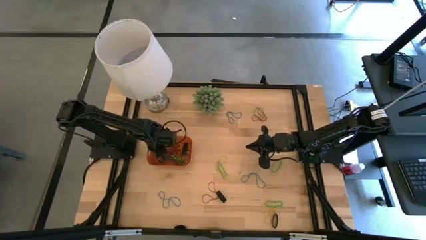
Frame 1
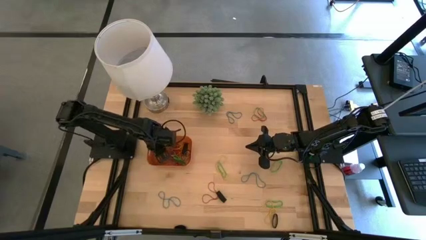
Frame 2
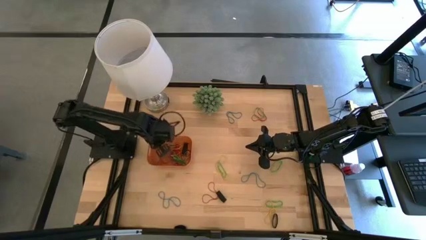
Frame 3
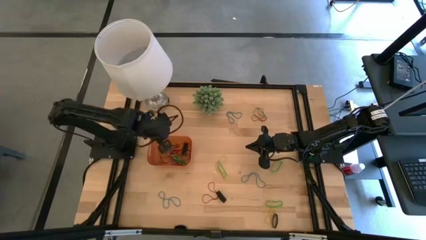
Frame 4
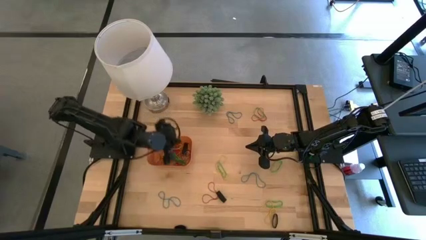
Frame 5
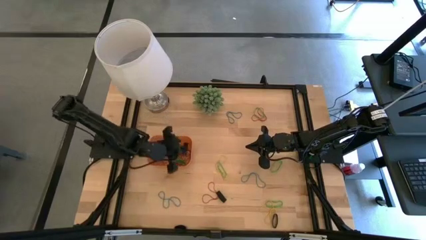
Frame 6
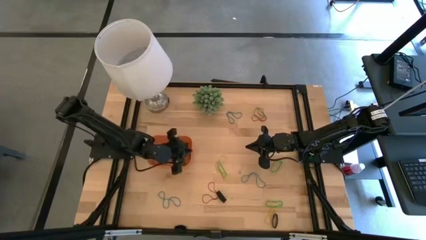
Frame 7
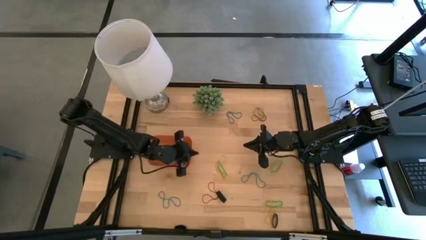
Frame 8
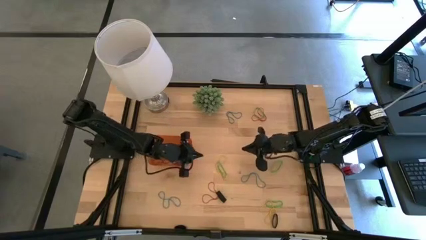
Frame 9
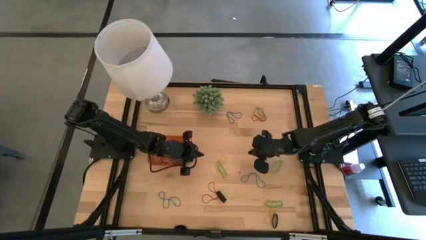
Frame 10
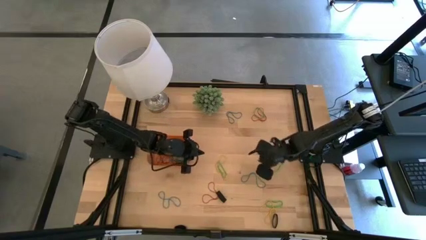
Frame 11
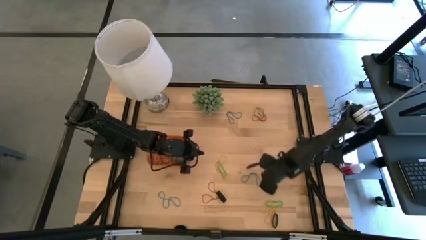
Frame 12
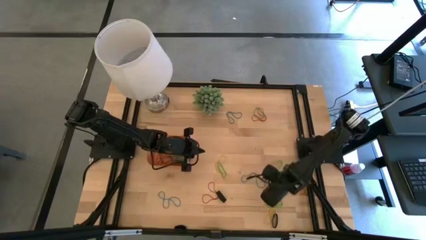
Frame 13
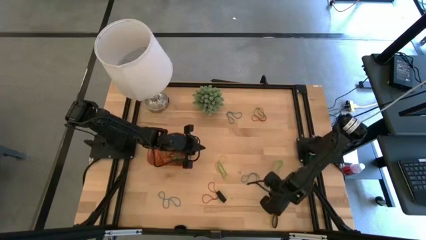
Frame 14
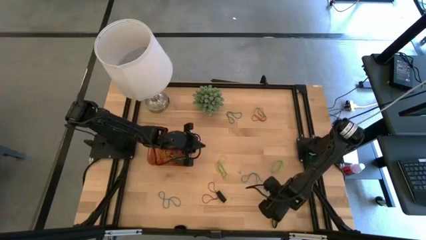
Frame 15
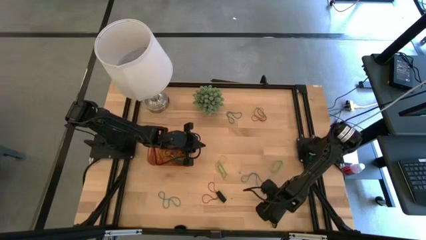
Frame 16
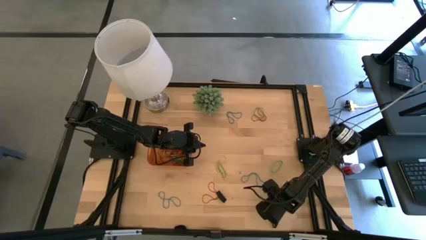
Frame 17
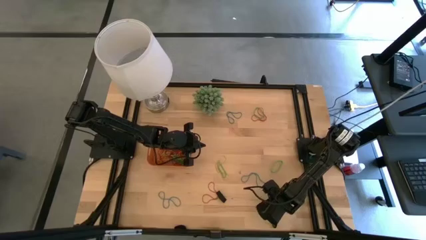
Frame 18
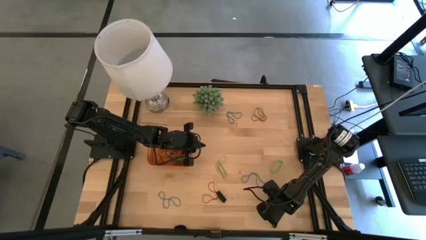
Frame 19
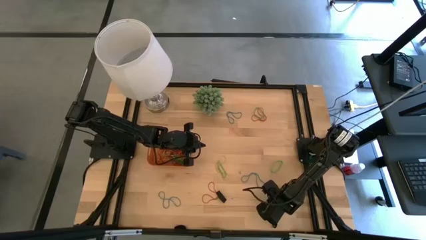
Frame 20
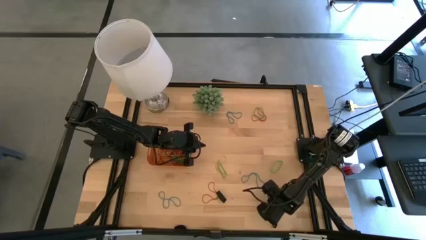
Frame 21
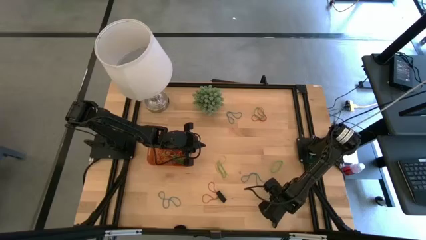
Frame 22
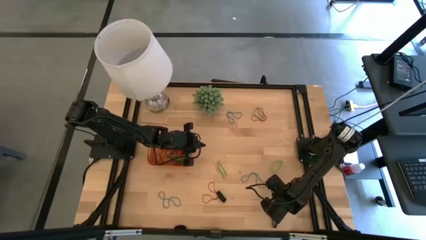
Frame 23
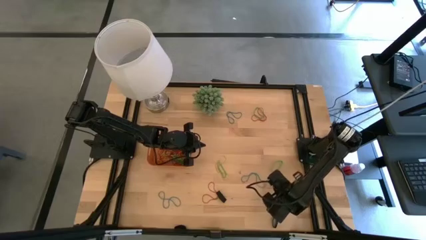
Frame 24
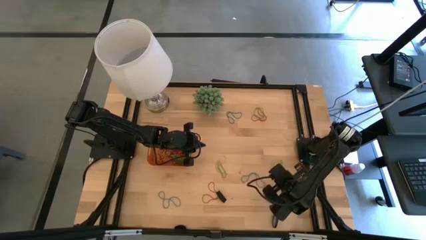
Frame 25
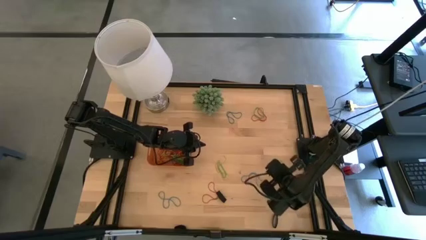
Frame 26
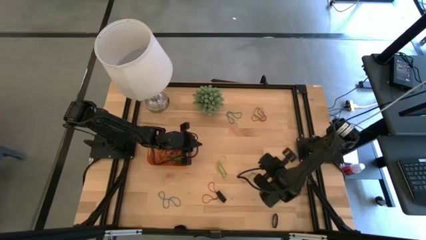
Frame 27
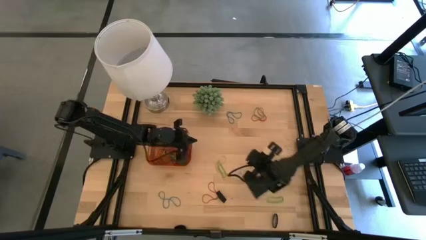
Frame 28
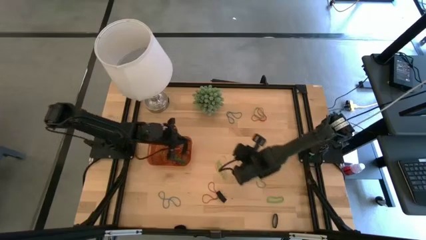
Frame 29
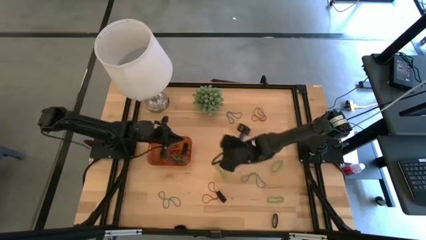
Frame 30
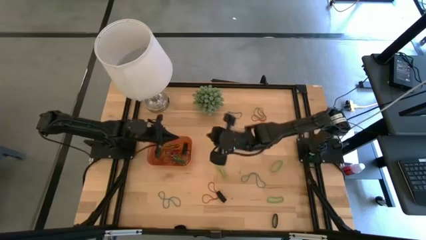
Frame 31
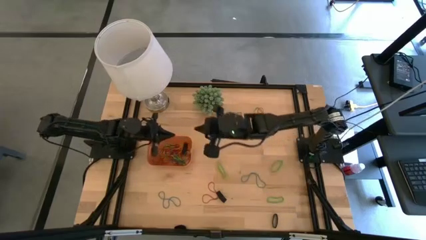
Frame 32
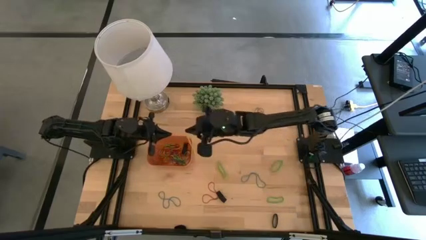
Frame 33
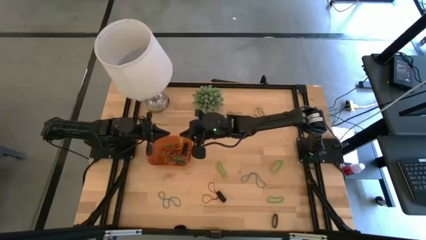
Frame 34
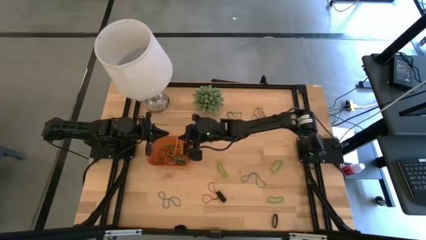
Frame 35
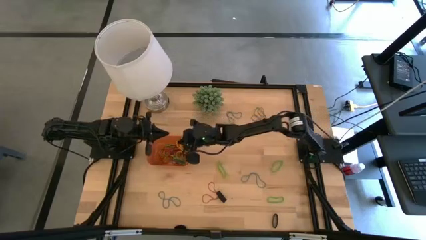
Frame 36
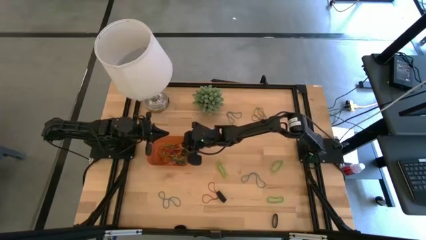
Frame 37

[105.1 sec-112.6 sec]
Task: Pick and place rubber bands into bin
Put the yellow rubber band into the orange bin

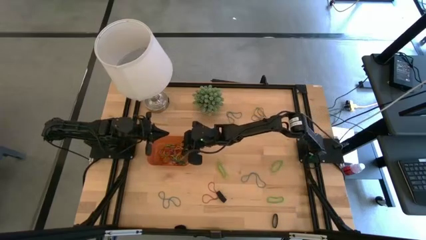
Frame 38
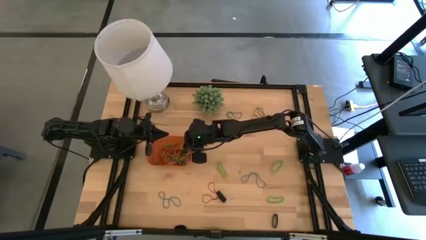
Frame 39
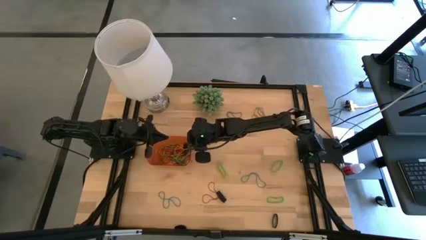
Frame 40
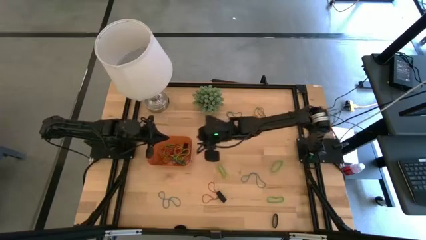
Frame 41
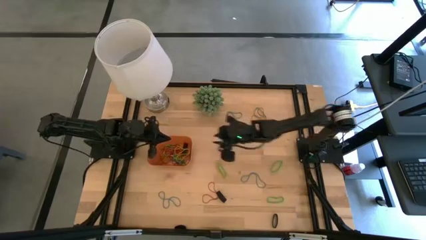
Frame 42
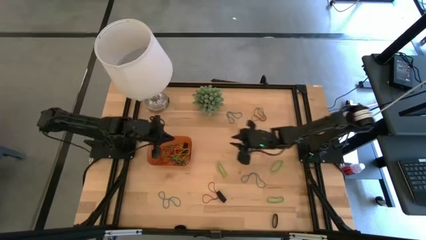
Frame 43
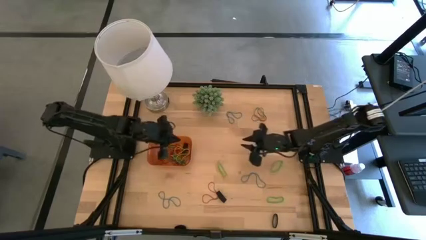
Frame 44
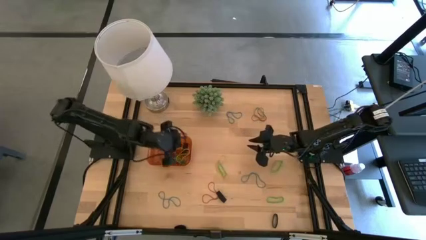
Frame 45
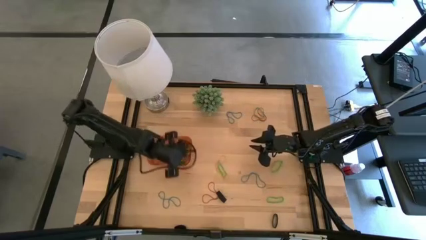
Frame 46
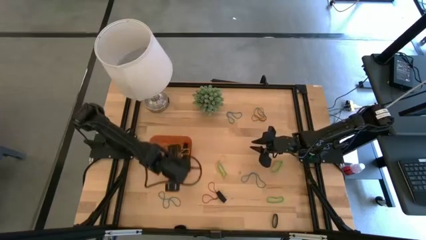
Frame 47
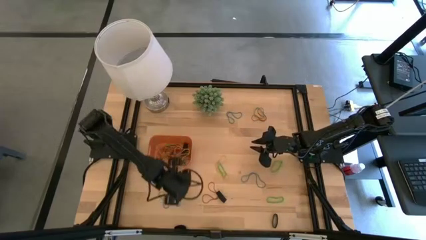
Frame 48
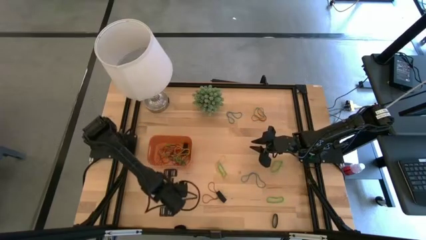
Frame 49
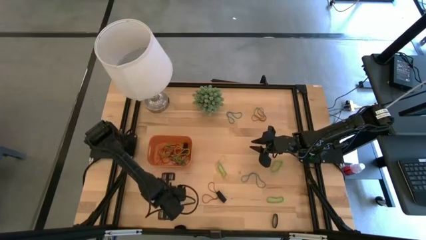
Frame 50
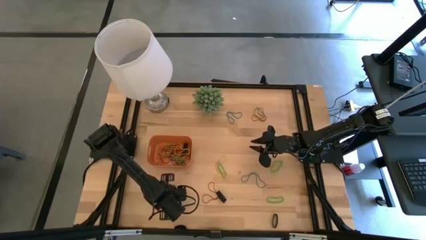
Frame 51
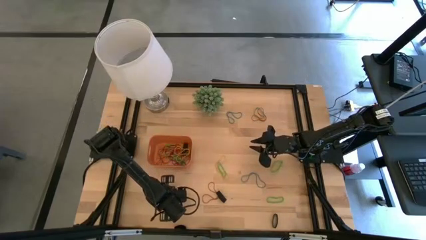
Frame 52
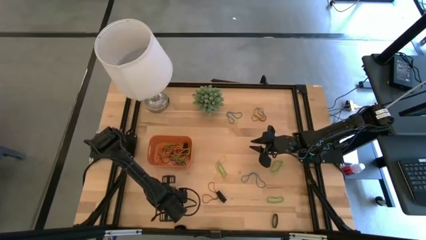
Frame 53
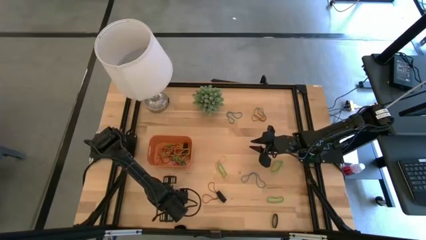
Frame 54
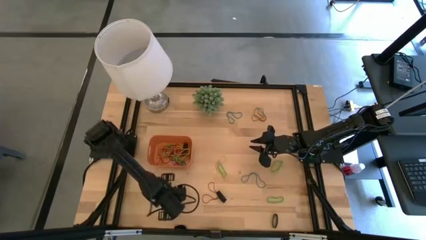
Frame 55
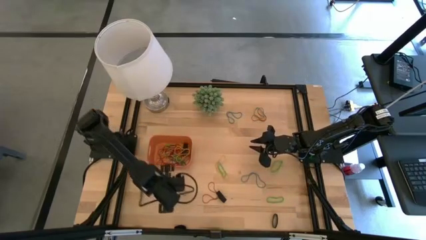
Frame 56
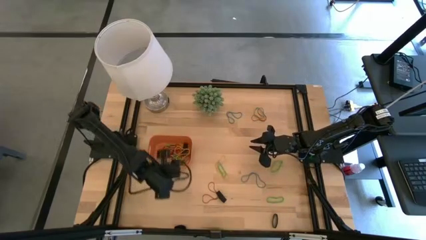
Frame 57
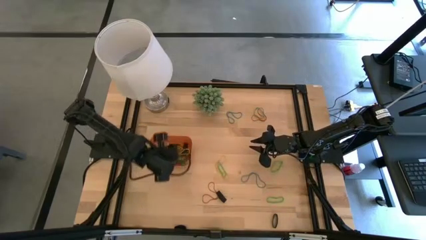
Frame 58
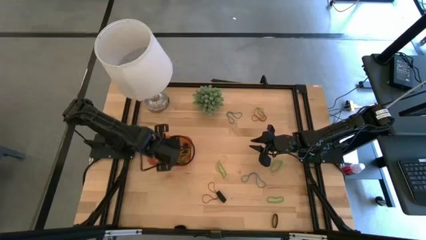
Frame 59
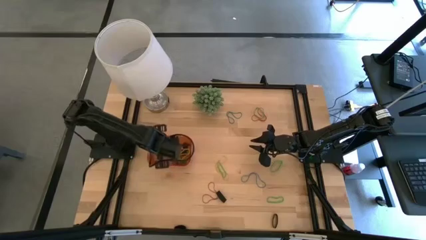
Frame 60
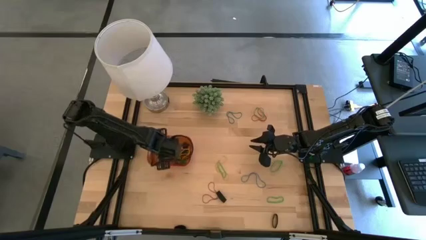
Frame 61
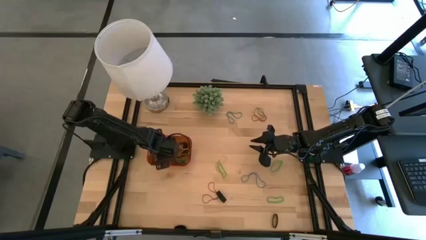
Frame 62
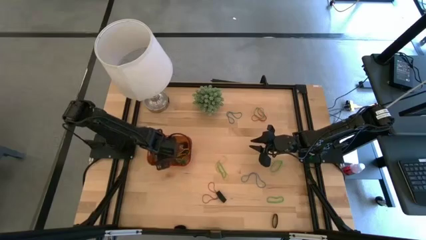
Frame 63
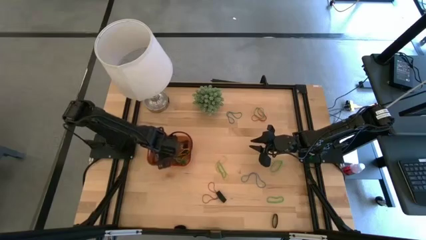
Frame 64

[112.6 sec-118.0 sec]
Put the blue rubber band into the orange bin

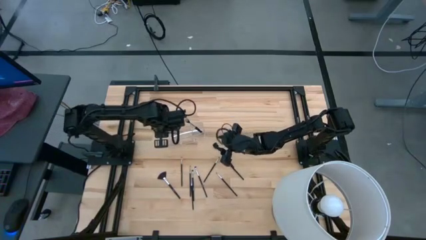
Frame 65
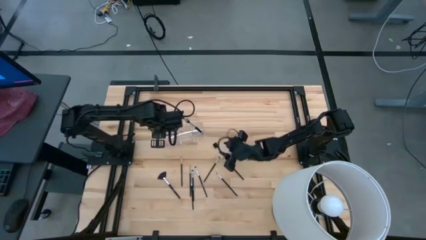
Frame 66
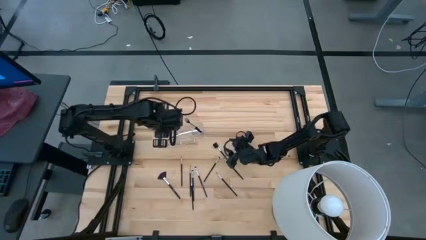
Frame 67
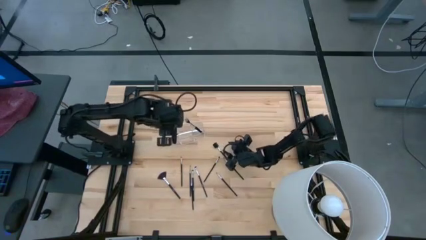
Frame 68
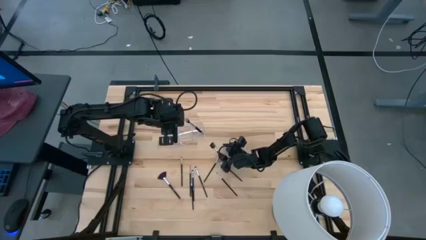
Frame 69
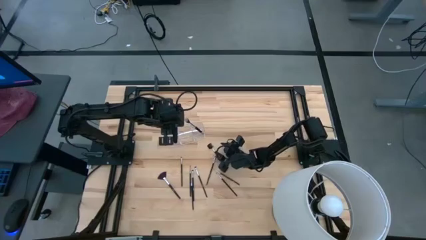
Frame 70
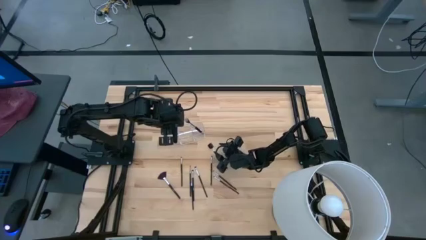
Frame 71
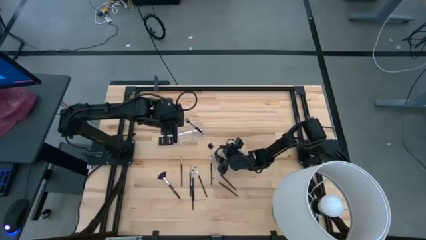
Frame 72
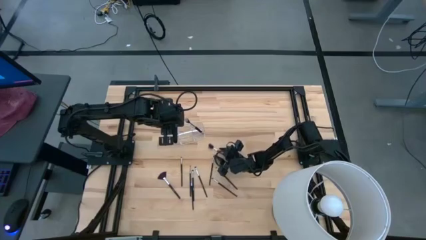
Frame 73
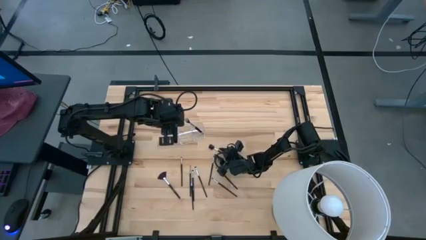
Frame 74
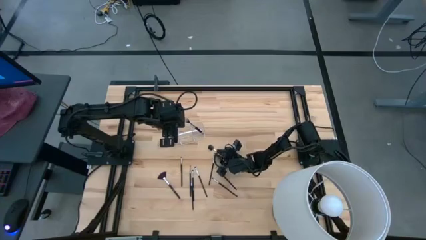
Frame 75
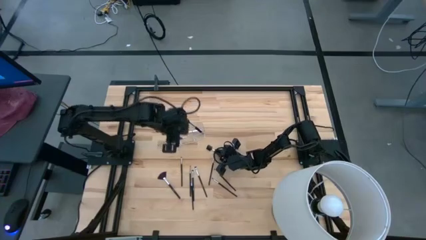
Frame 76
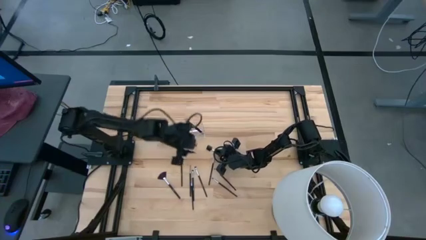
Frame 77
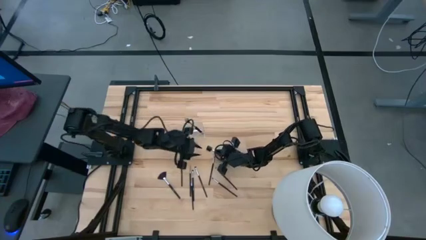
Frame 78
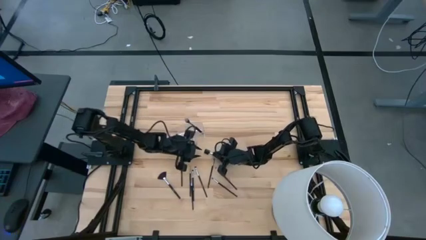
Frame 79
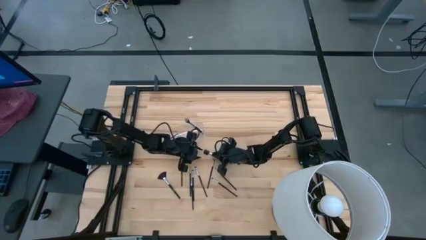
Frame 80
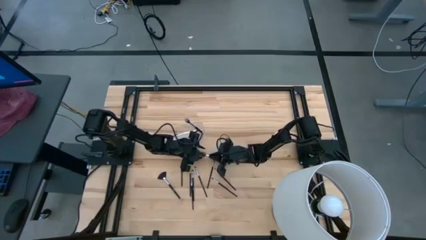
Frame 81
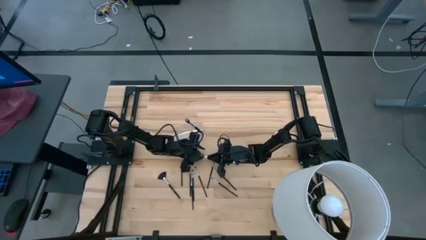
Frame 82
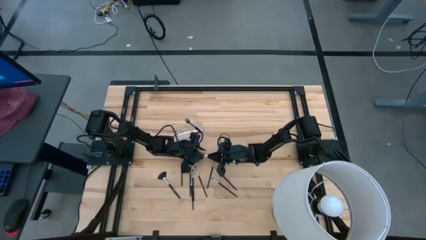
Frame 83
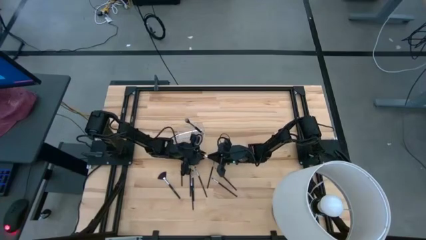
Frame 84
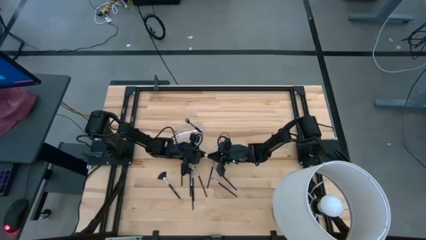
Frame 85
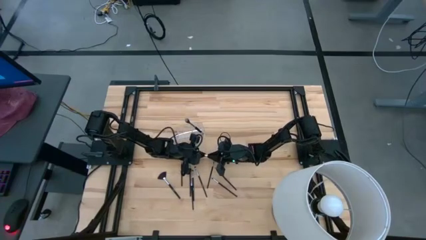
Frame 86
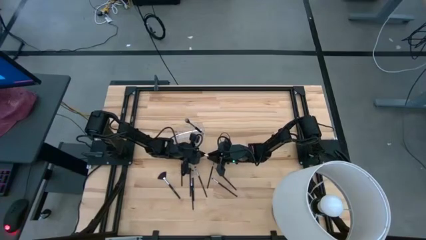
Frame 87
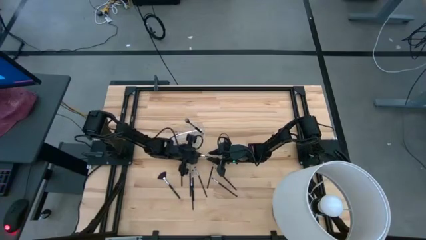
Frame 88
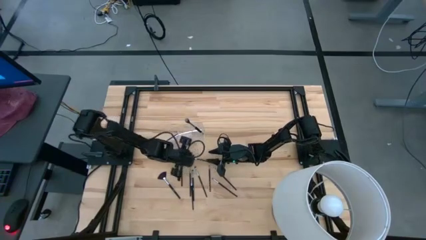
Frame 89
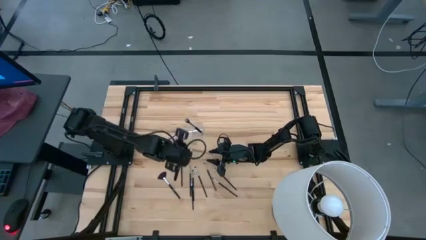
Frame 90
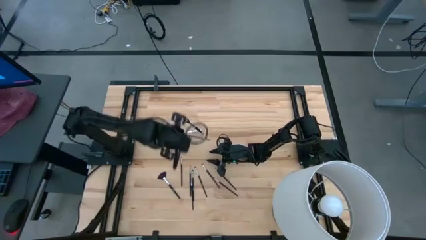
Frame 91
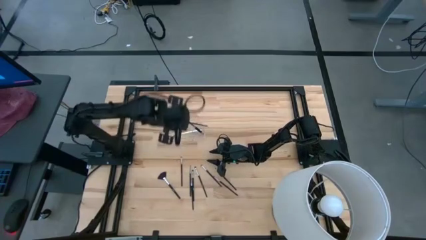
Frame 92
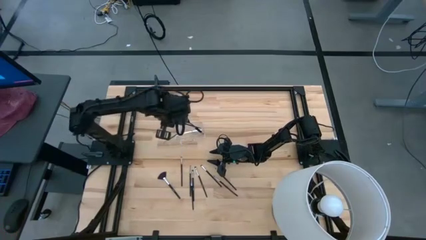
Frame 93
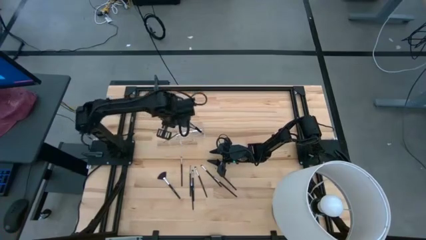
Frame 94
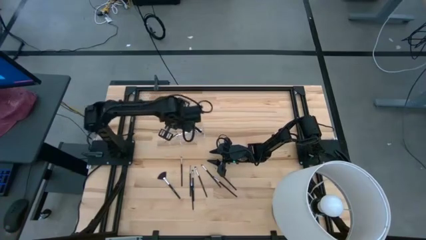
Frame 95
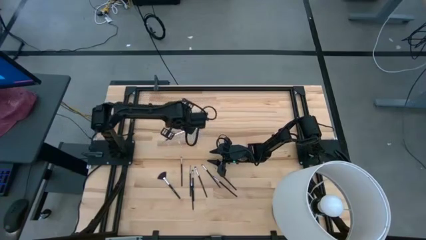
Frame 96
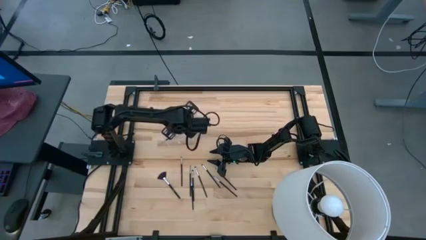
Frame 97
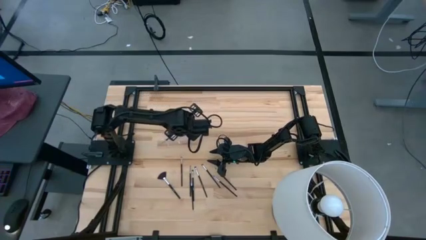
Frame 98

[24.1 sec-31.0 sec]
Task: Put items in baskets/containers
Put the eye groomer brush into the right section of the transparent organizer
